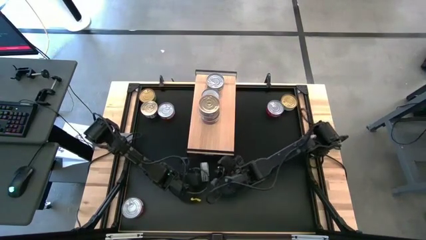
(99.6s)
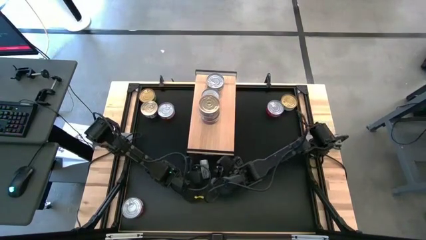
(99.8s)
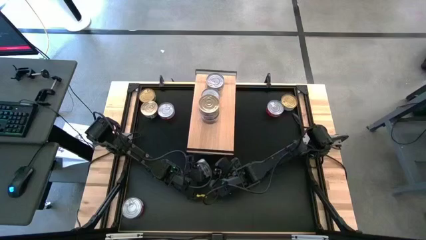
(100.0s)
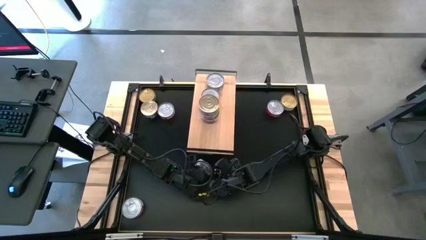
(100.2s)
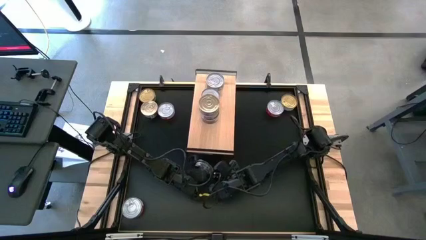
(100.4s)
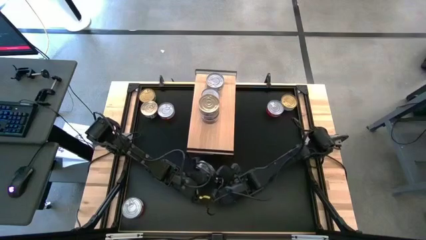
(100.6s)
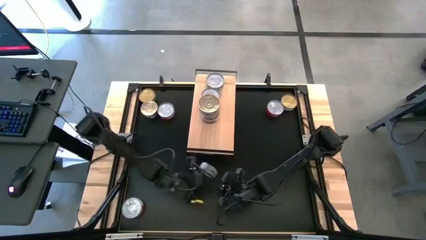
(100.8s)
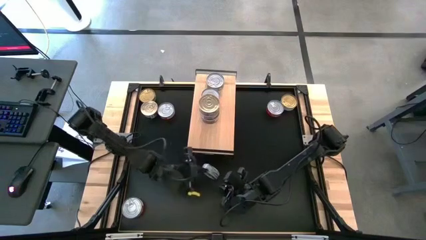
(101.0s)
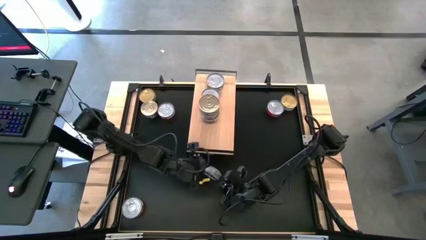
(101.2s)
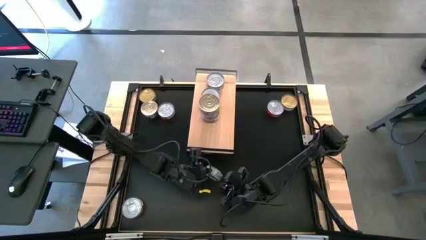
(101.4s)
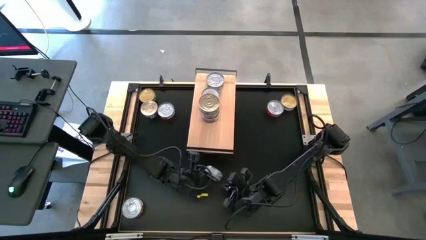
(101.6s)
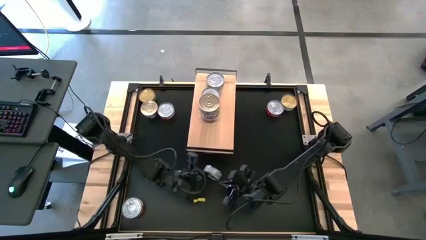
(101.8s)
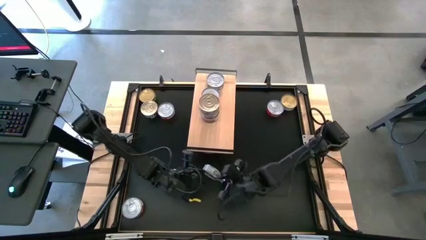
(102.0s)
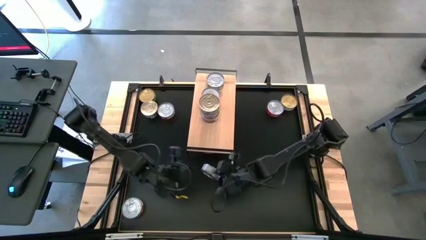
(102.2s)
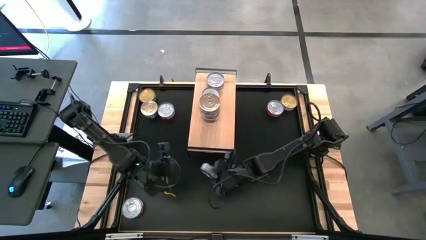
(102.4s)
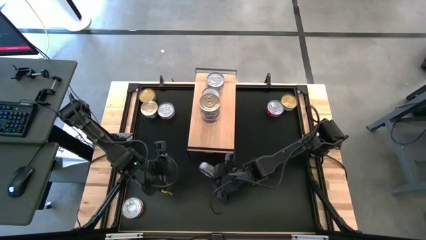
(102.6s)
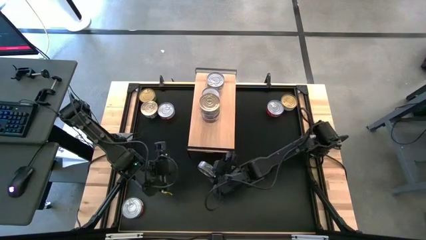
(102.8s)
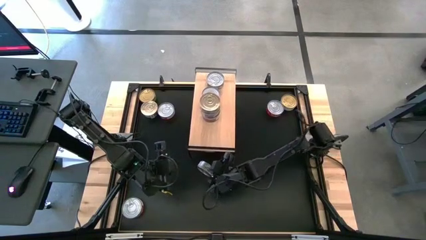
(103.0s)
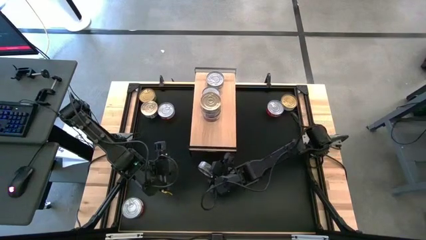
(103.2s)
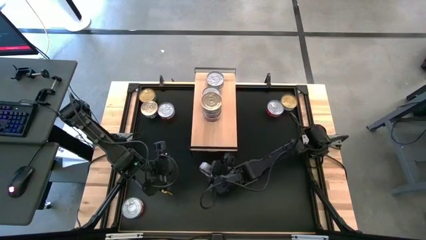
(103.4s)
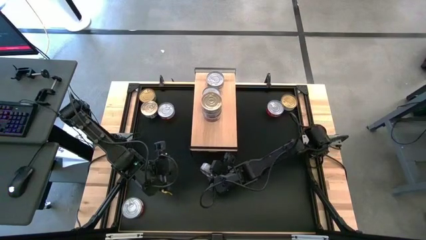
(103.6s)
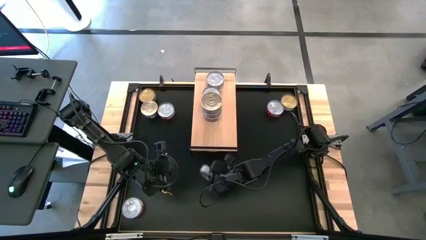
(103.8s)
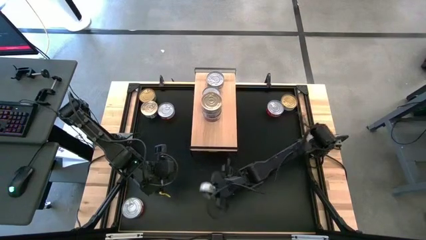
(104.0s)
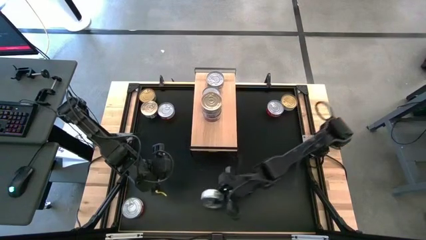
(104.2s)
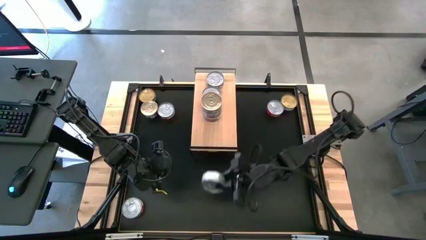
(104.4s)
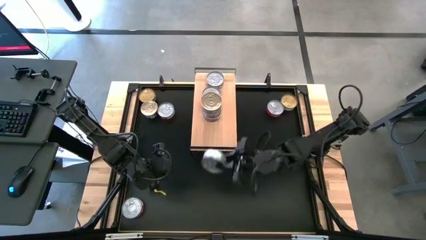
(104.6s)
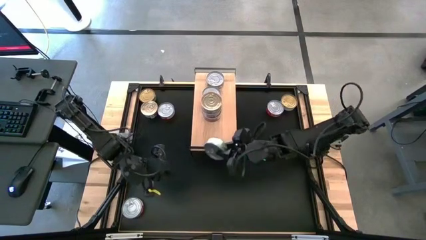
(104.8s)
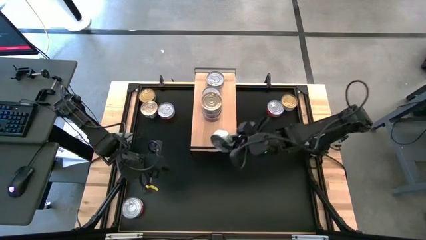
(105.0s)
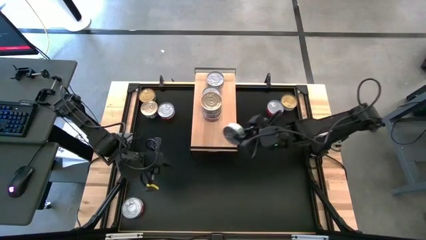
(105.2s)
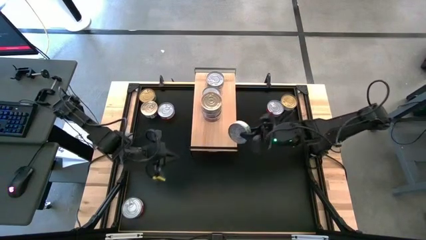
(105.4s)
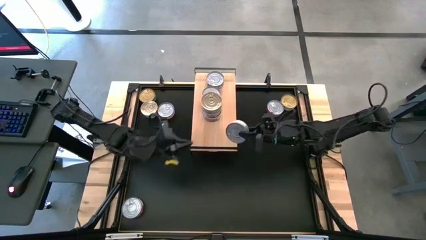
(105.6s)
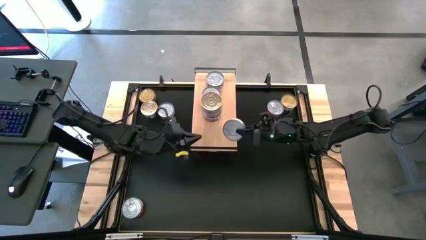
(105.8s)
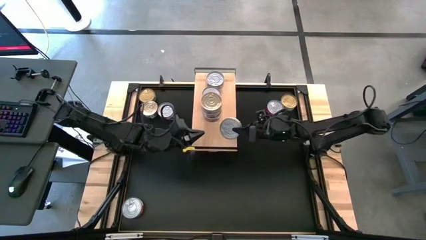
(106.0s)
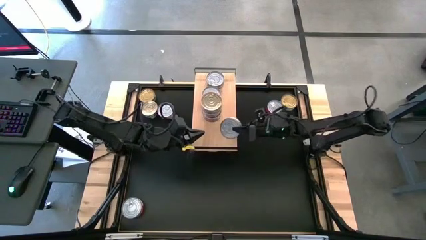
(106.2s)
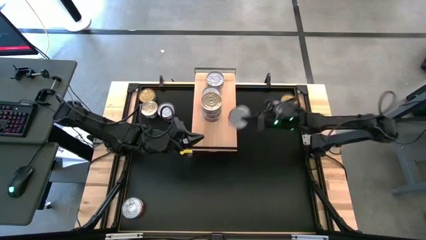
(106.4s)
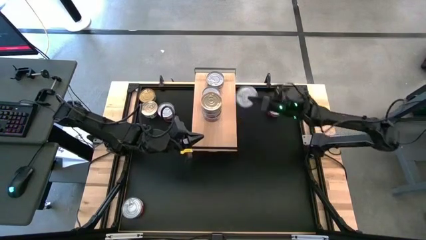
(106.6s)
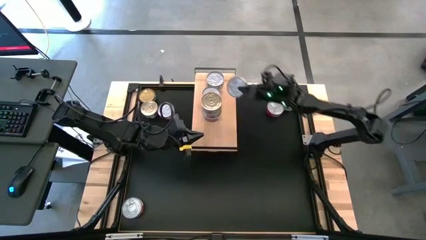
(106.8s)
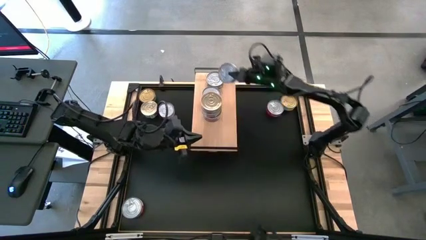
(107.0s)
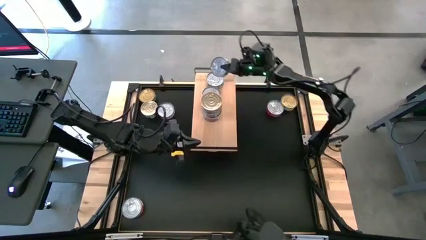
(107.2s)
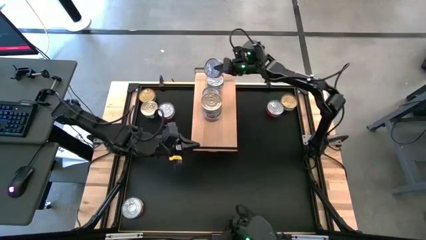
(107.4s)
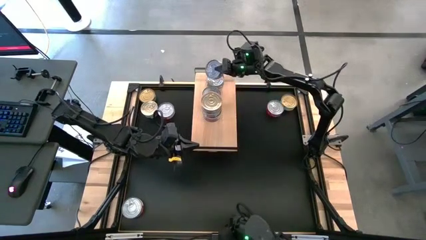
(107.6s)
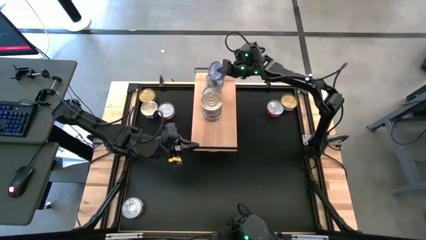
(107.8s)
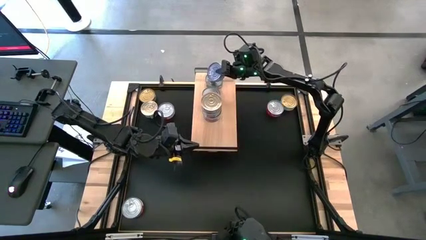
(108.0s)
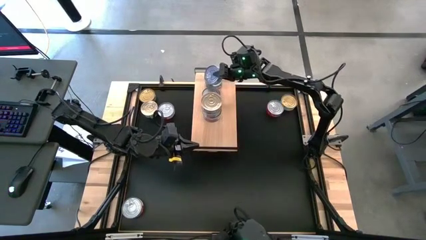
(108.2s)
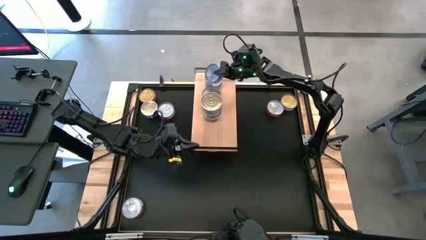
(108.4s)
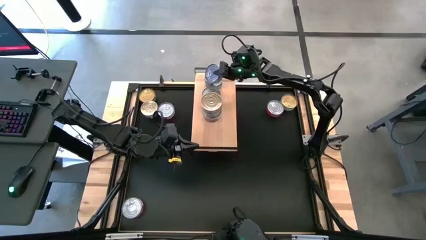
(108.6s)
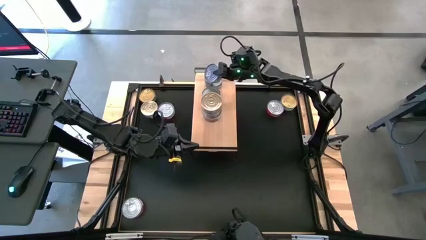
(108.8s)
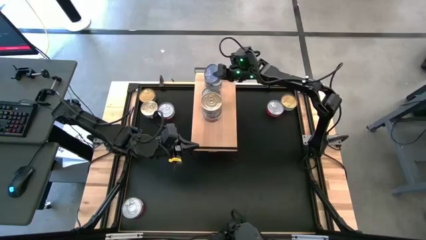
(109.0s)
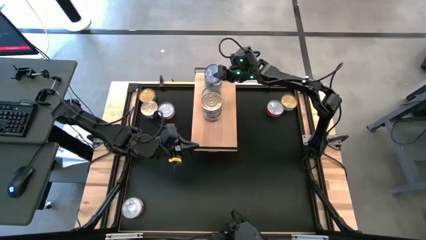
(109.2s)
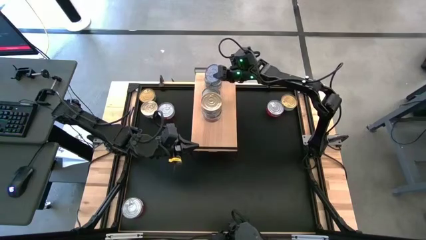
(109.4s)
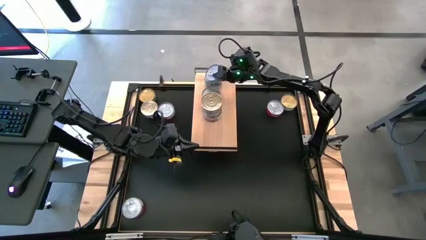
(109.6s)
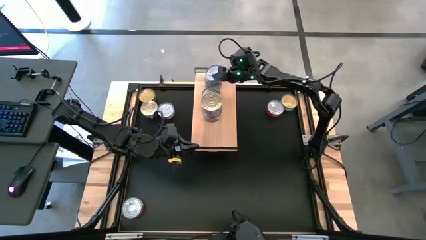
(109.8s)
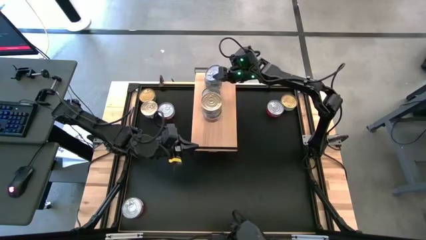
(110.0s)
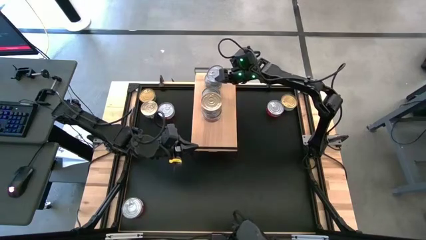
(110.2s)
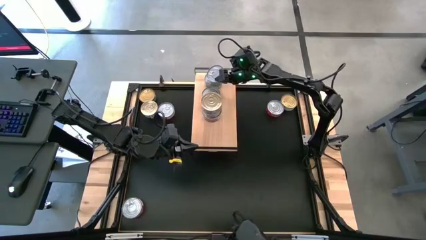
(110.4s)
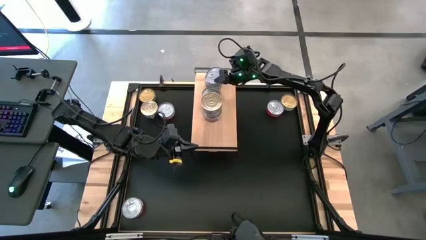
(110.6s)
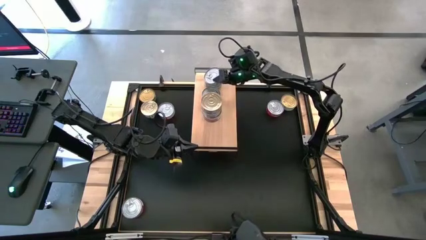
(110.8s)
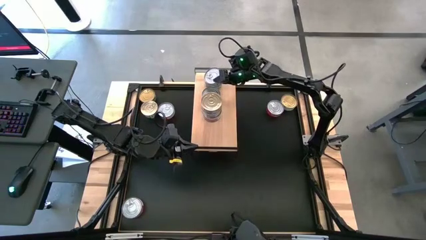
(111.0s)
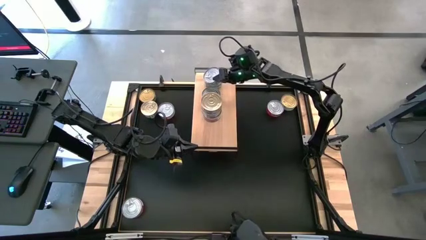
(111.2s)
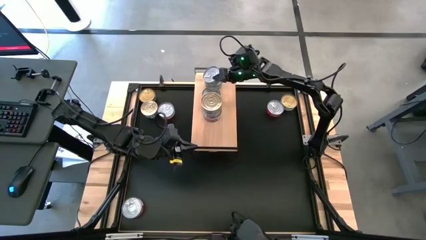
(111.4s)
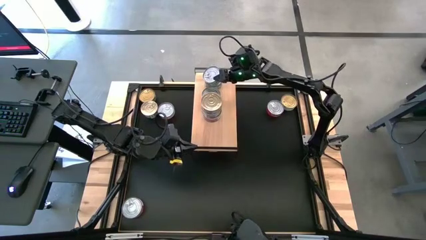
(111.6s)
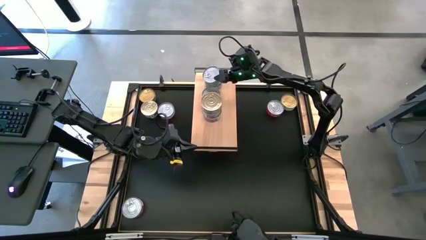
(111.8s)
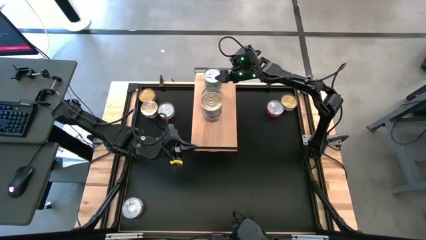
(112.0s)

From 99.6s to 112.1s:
Task: Stack canned seafood by type on shelf
Stack the green tuna can on top of the green tuna can on the shelf

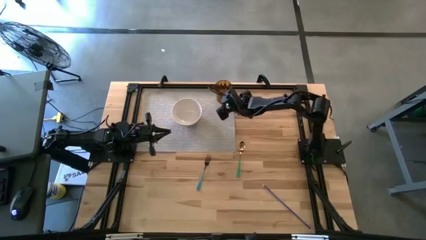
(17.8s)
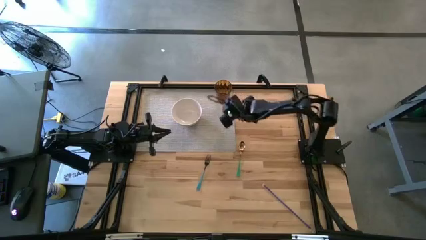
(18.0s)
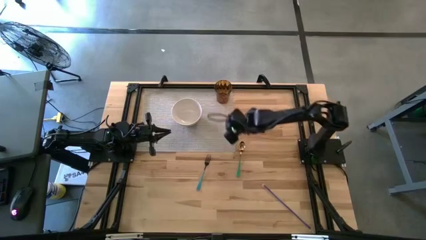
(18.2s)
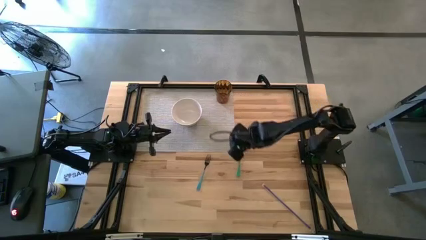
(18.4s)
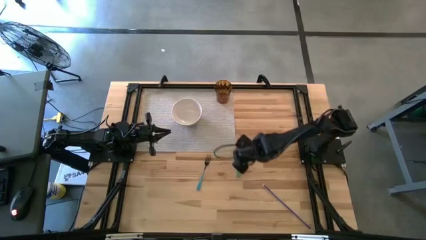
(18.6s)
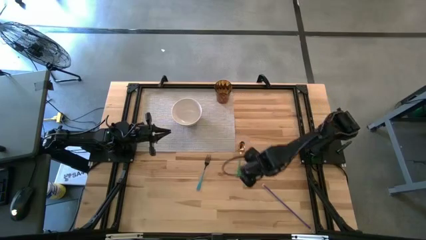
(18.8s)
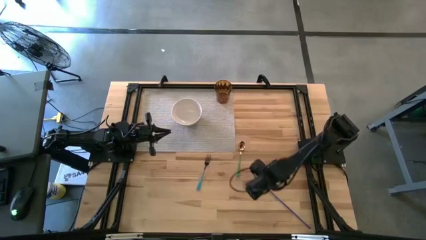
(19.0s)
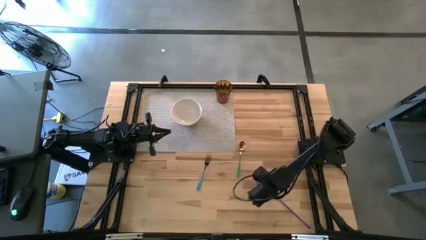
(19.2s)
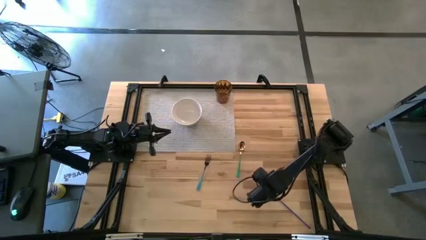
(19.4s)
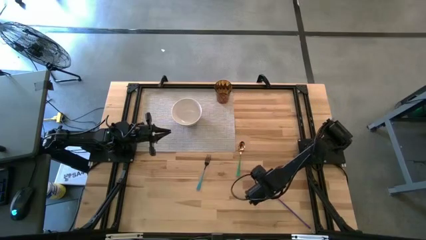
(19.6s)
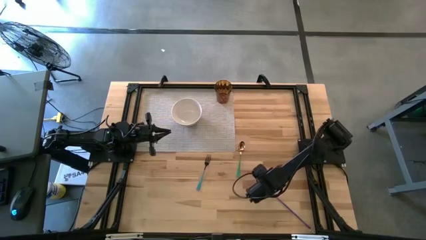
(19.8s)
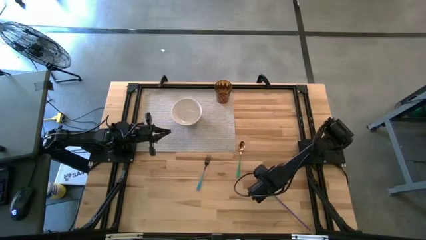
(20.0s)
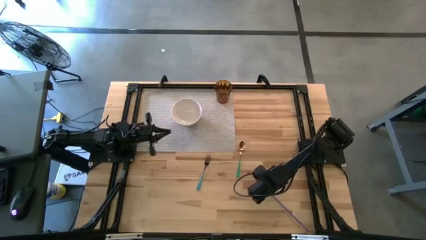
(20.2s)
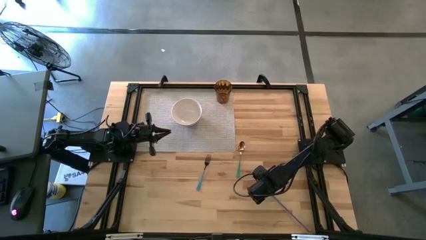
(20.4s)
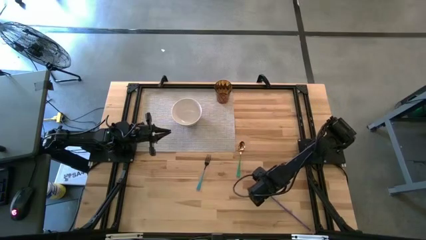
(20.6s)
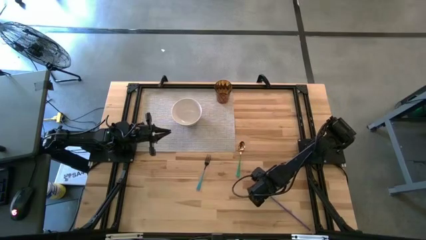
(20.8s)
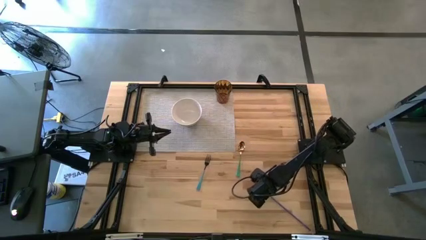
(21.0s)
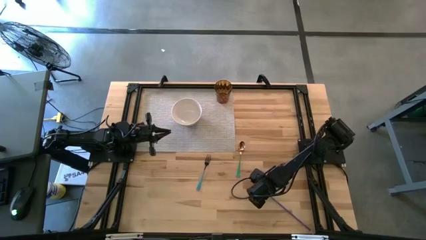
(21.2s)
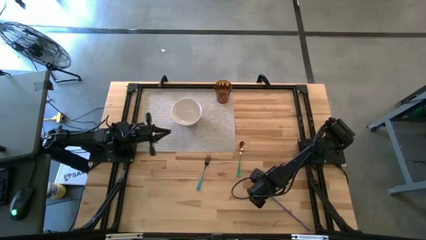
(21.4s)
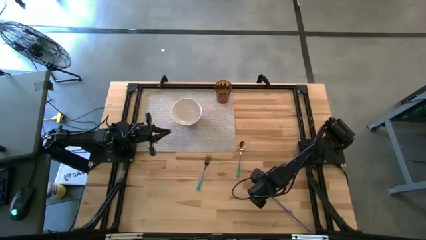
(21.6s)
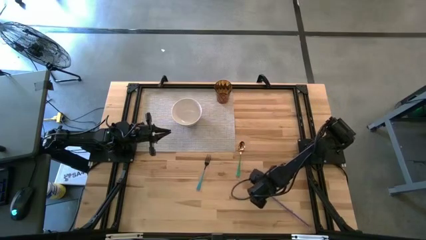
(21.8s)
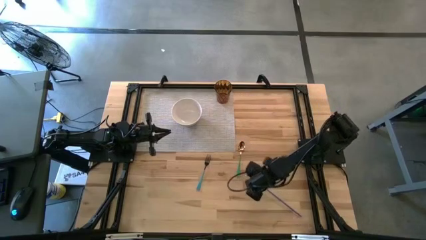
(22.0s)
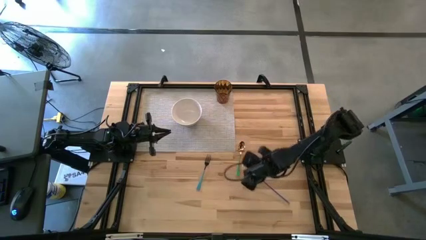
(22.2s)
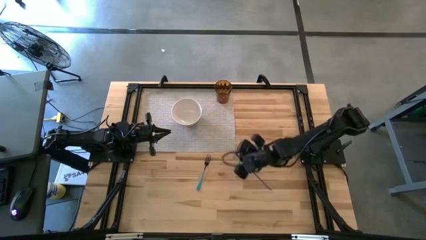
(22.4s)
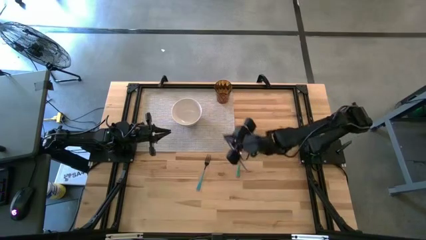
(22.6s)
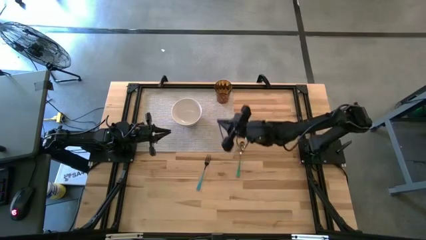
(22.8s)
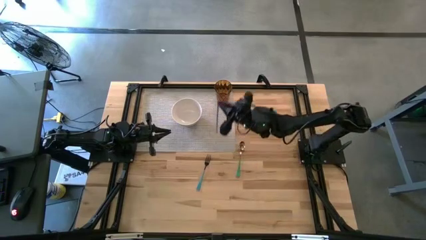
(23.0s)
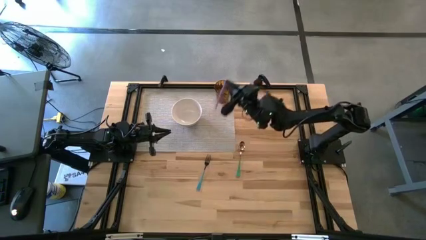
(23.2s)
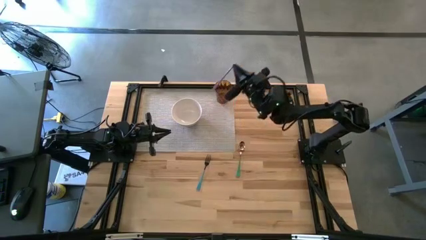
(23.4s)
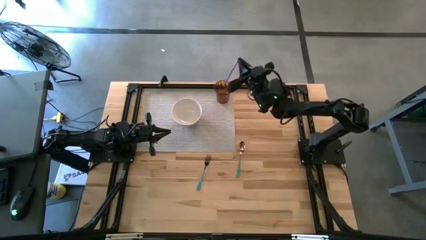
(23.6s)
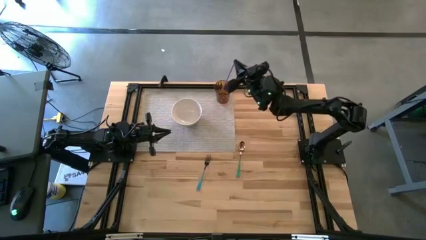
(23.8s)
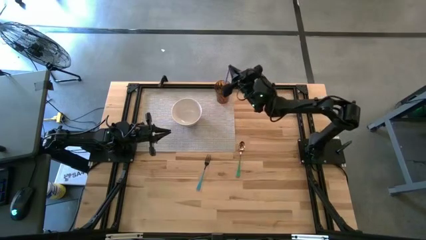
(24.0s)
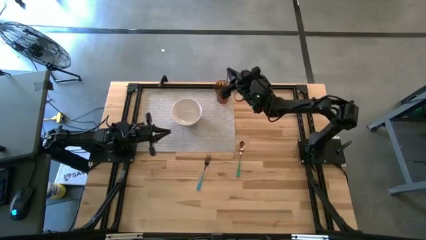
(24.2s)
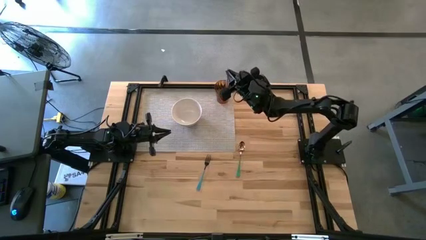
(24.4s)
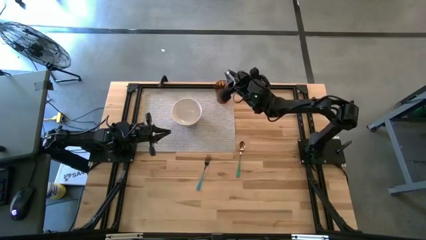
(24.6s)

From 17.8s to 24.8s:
Task: Pick & Place Utensil
Put the purple straw into the orange cup on the gray mat
